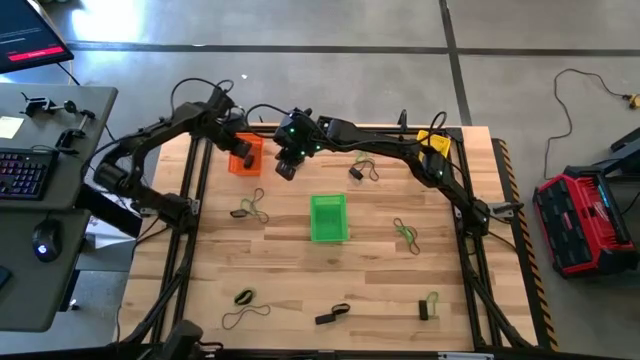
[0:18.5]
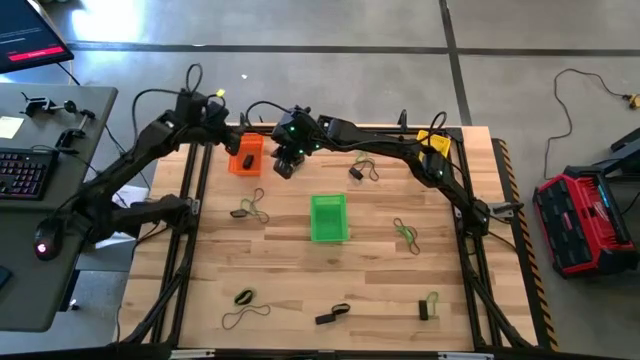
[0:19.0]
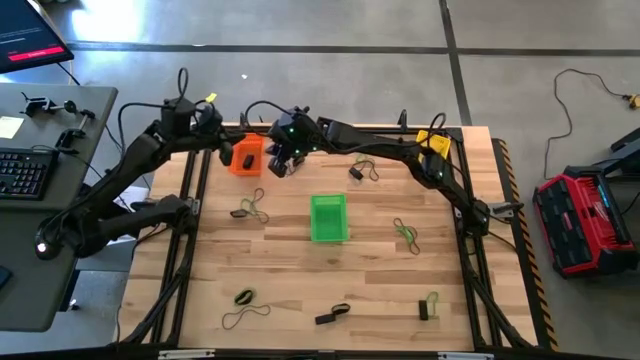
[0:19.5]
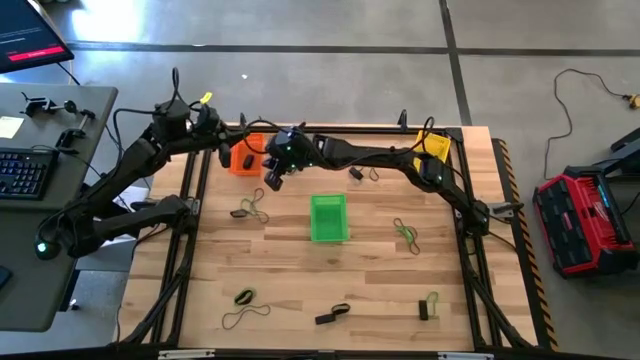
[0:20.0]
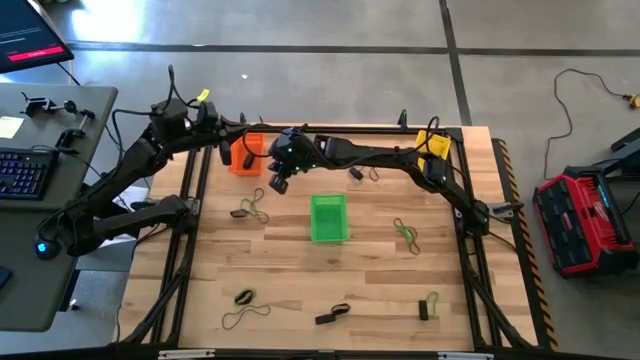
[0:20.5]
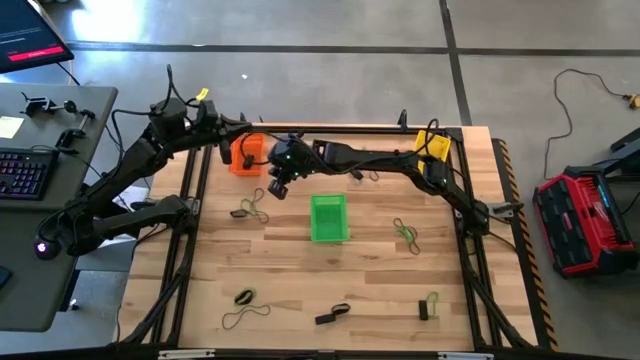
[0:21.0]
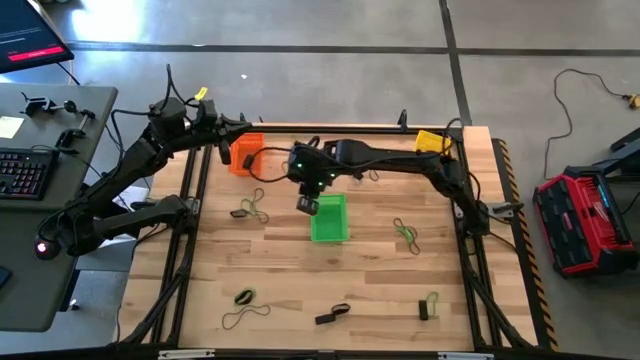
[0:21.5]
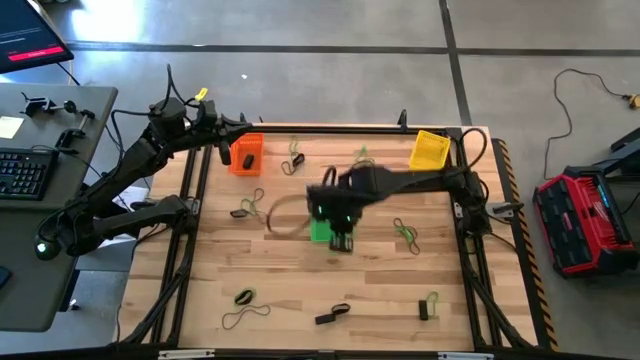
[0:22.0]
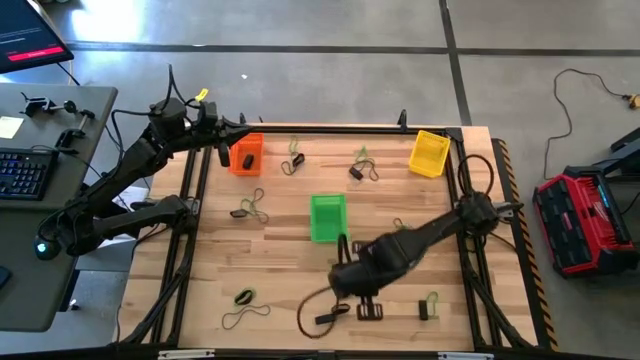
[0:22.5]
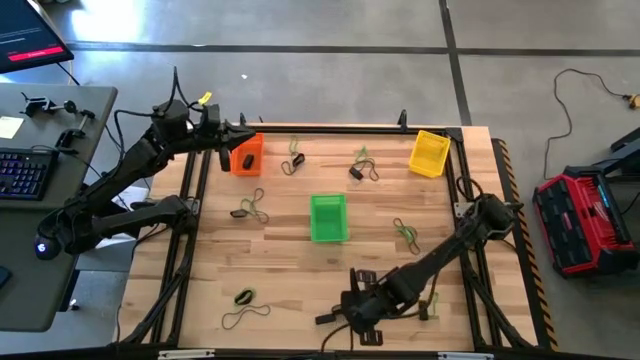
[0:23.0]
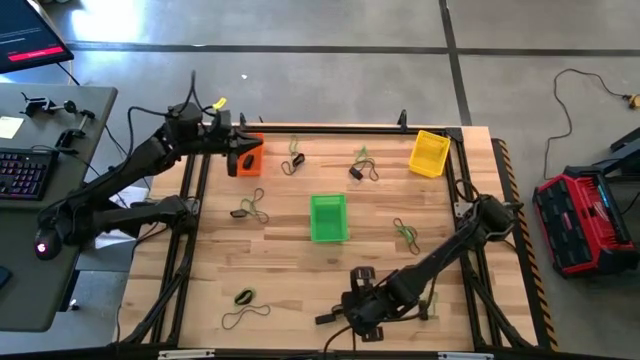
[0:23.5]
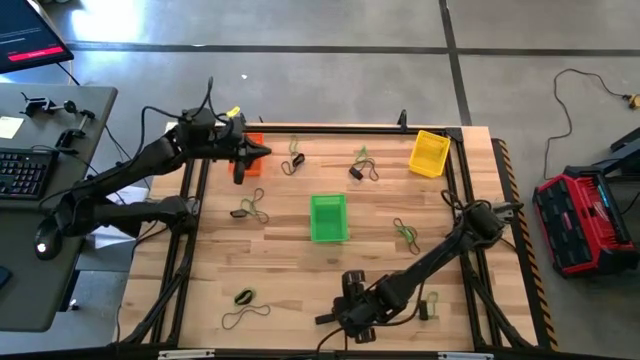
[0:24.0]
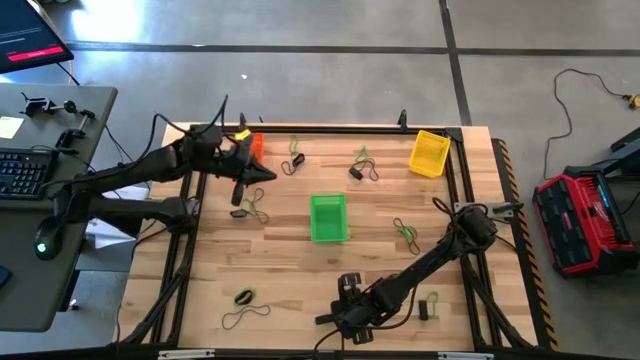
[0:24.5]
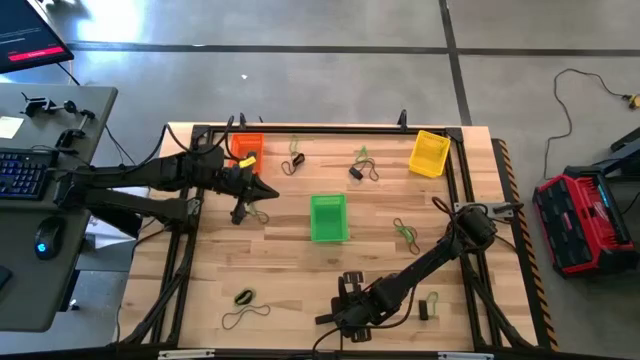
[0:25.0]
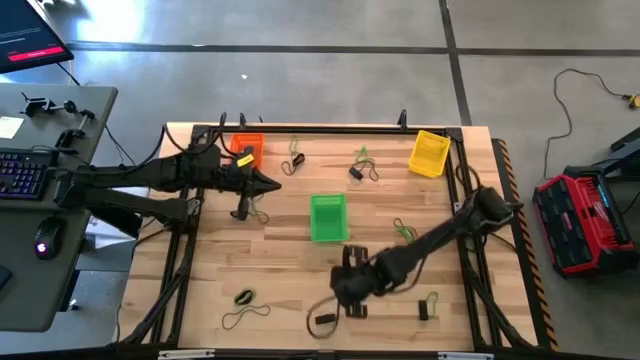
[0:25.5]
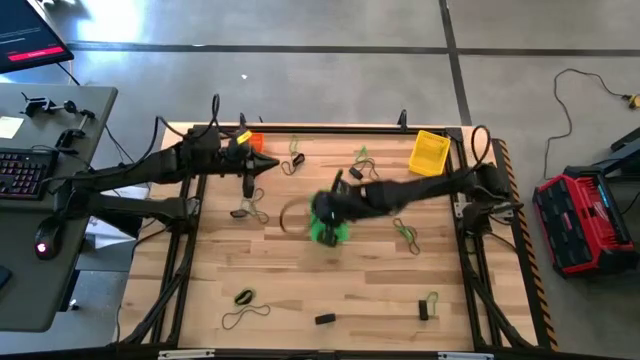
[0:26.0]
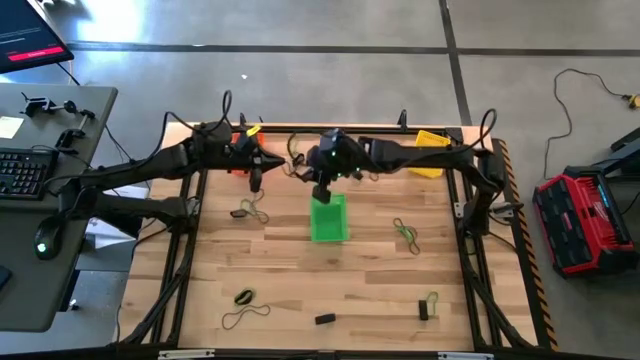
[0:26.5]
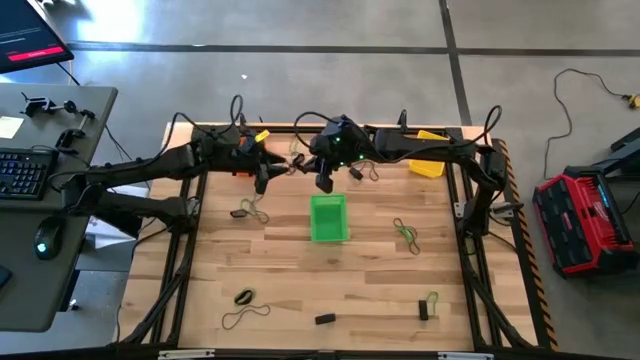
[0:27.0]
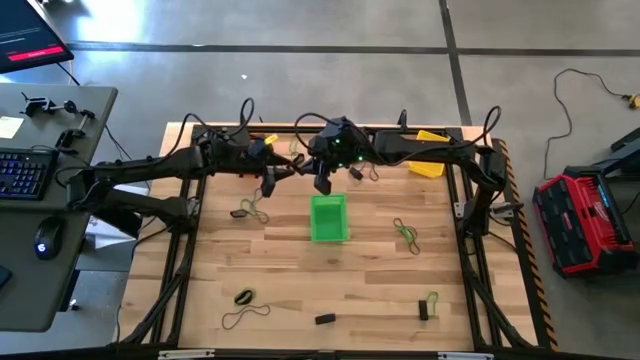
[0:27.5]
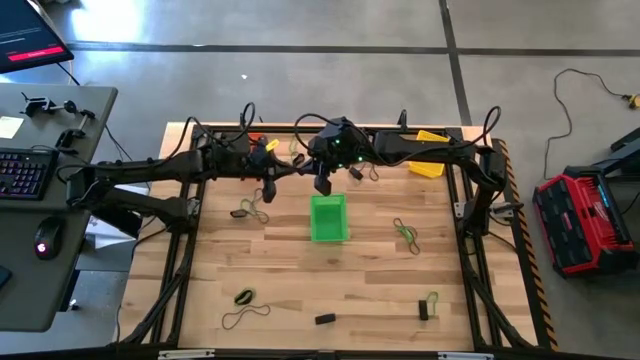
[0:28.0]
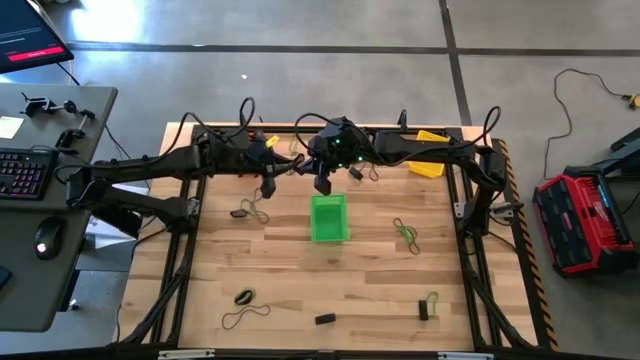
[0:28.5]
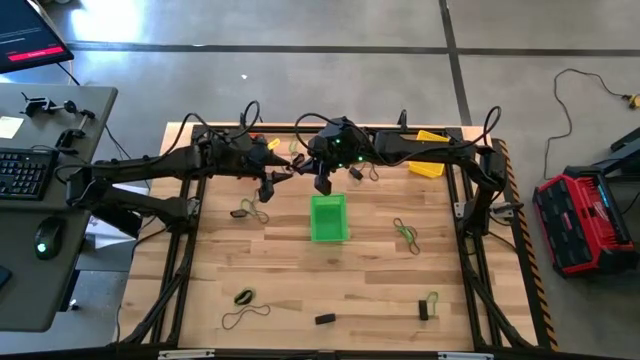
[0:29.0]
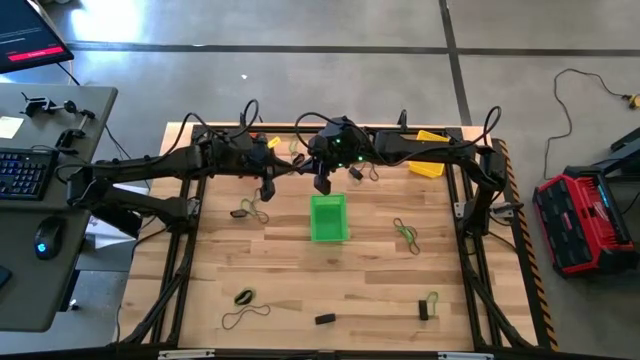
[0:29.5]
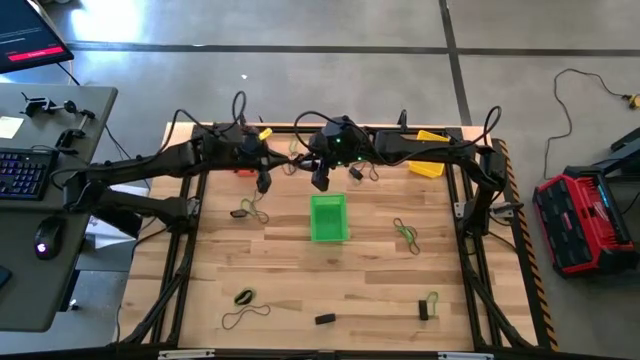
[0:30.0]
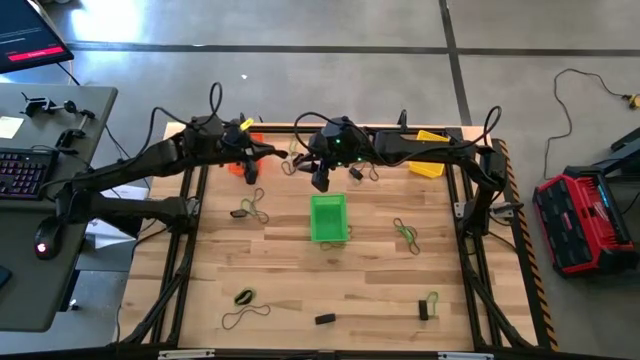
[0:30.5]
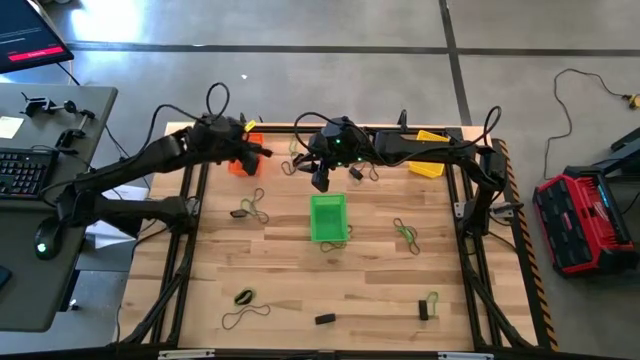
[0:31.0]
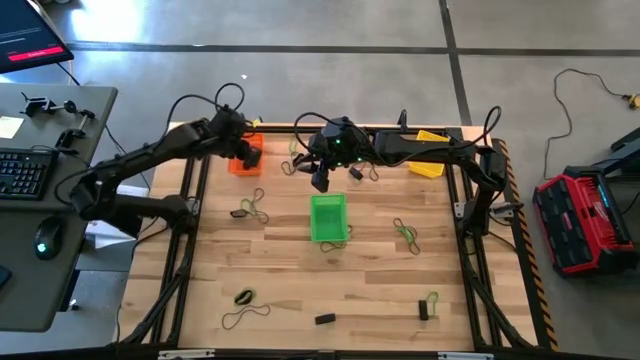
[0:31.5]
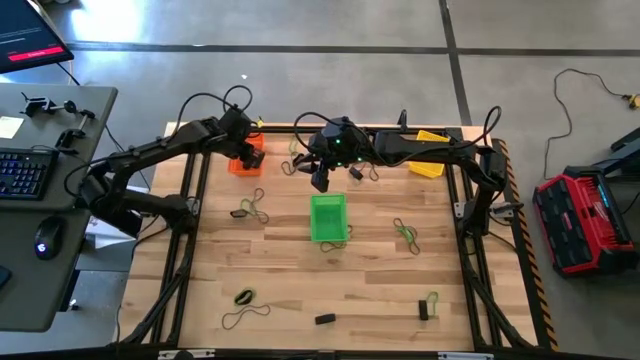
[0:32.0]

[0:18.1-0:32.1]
Task: Sort rubber bands into baskets
Put the black rubber band into the orange bin

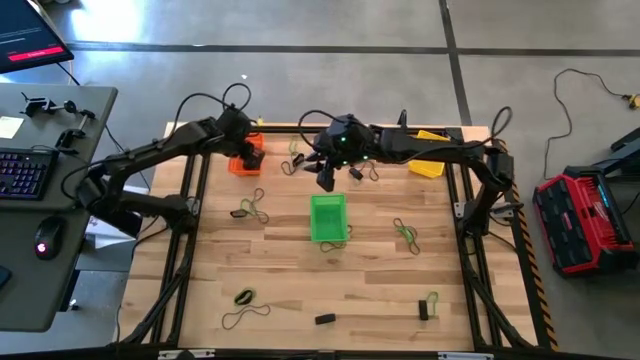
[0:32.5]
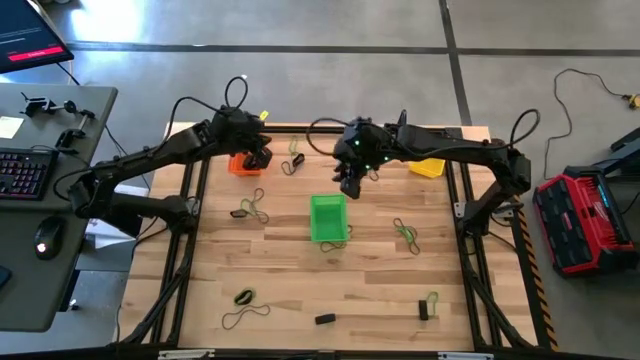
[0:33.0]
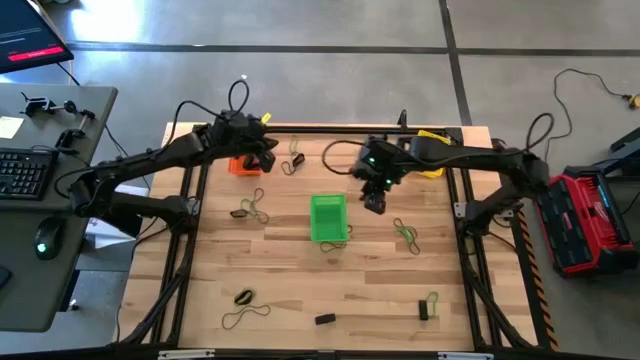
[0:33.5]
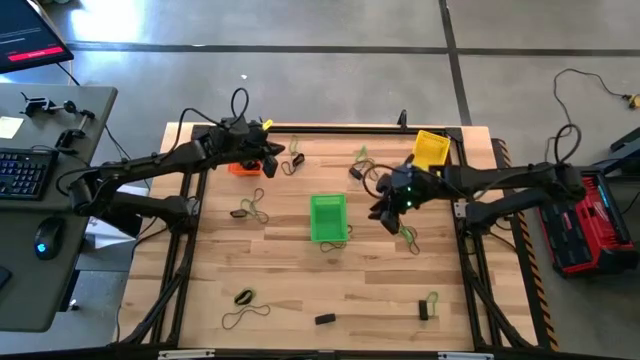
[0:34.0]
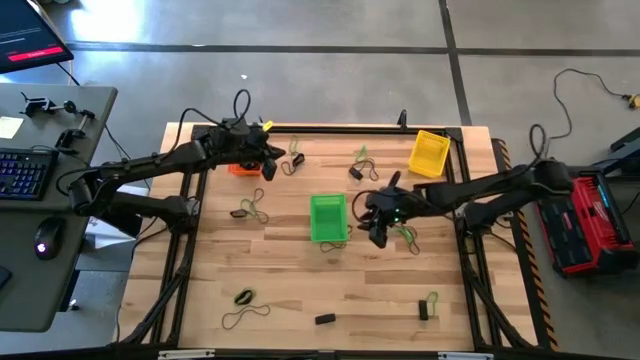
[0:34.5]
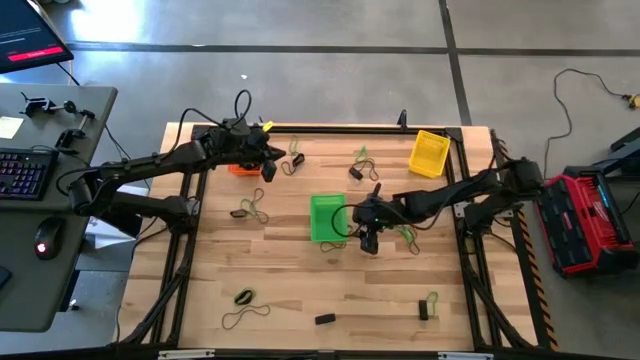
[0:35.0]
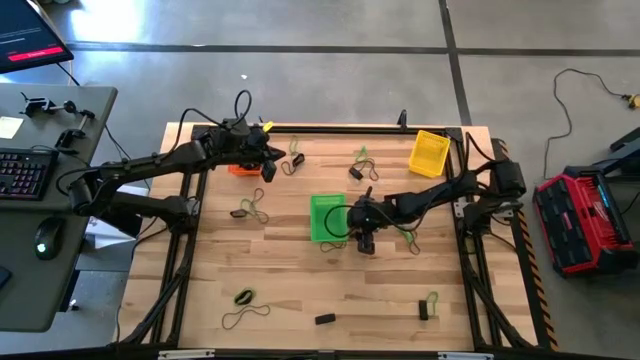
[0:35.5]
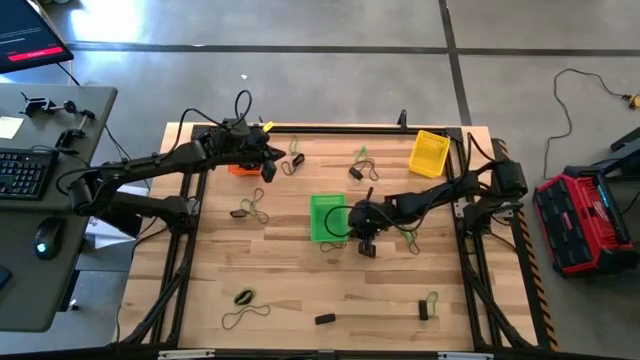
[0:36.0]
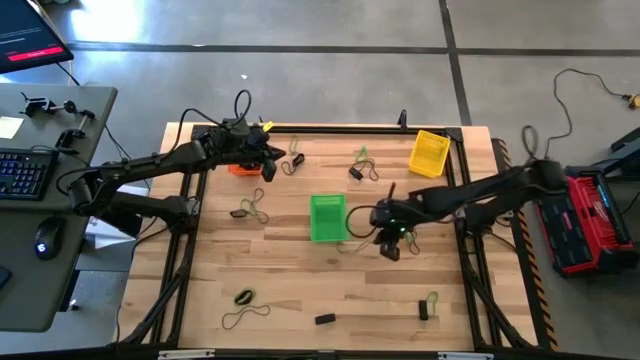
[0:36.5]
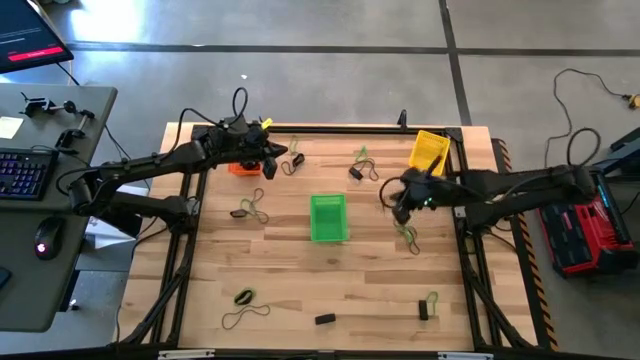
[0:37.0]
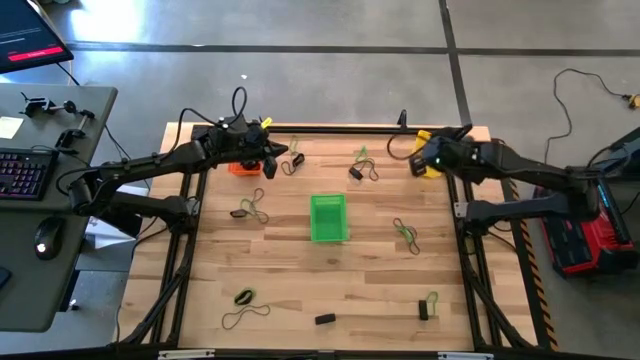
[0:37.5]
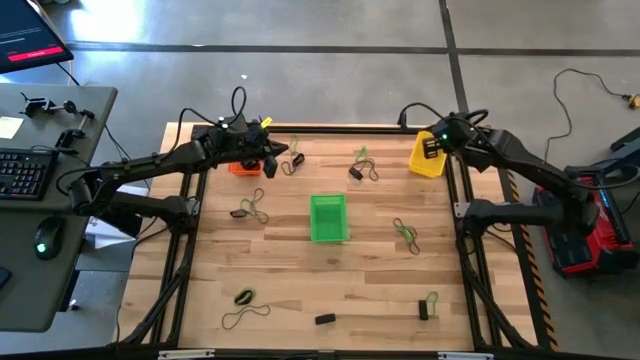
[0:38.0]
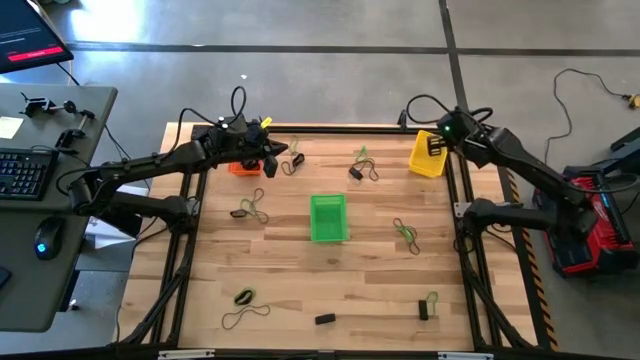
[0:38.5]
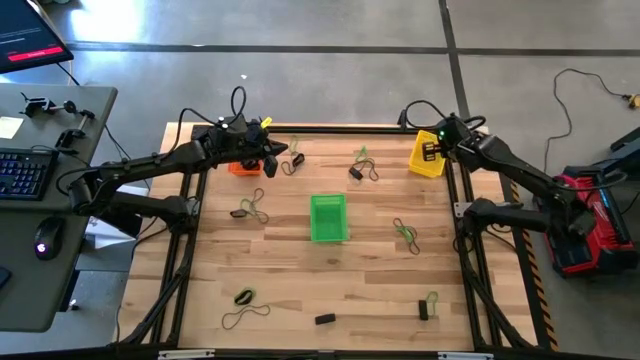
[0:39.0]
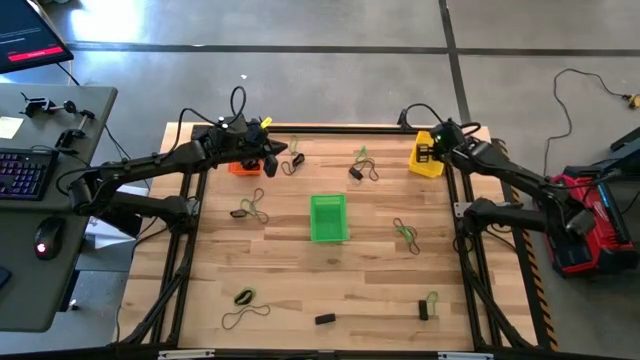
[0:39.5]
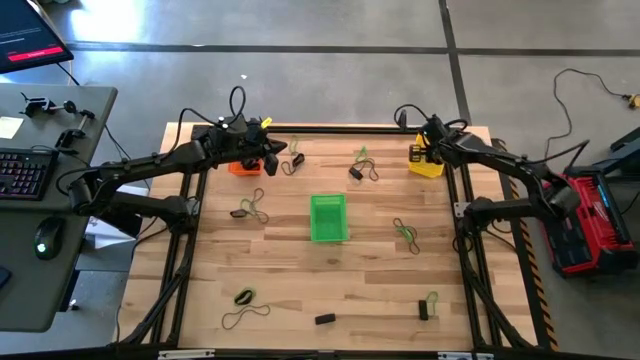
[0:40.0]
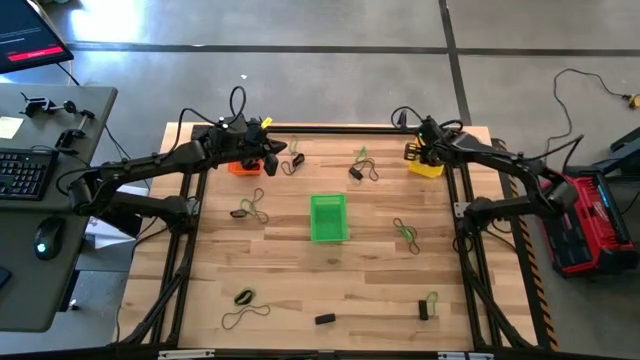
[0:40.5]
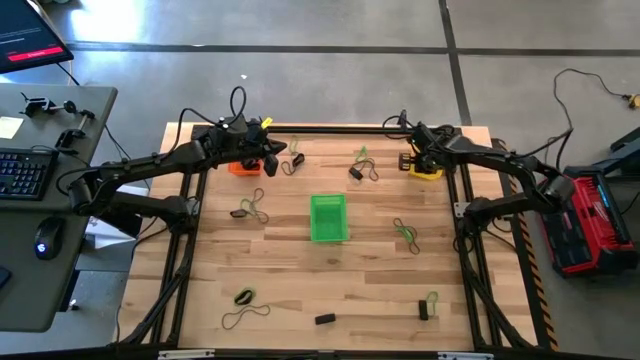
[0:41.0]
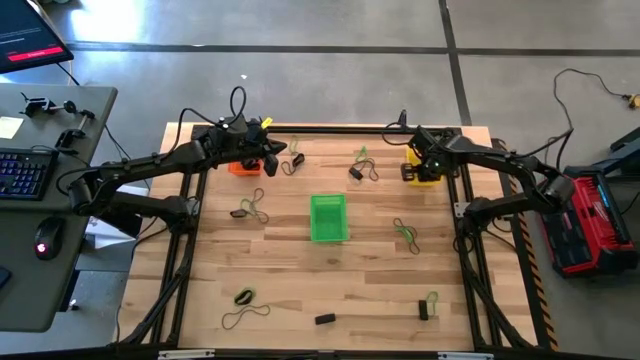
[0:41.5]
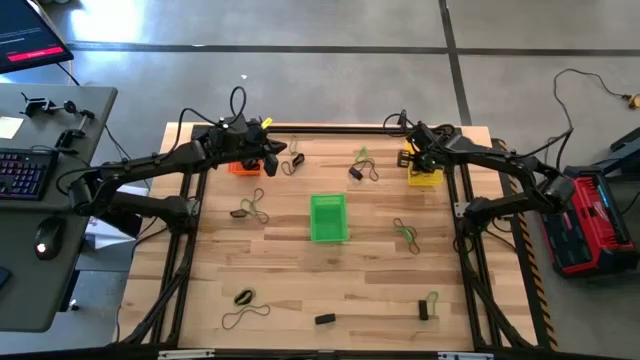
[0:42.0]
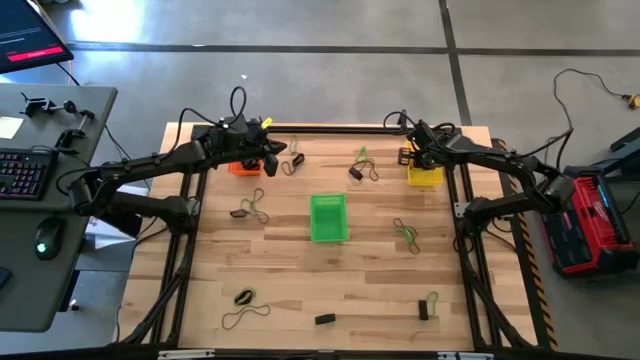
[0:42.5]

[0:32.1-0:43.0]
Put the purple rubber band into the yellow bin
